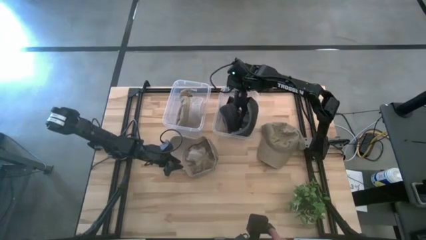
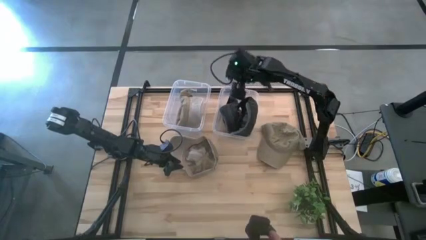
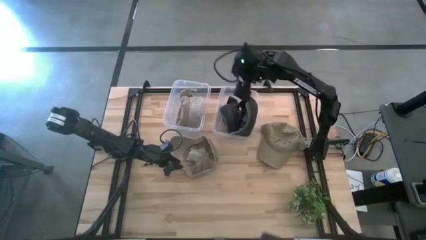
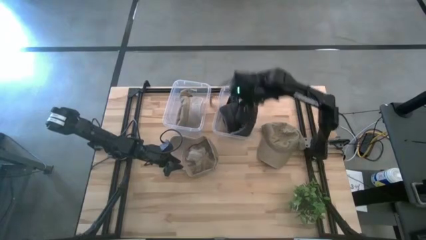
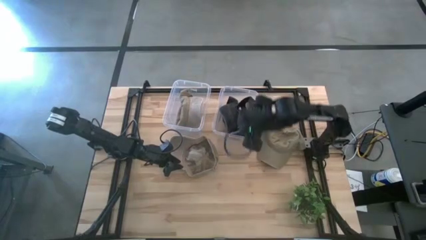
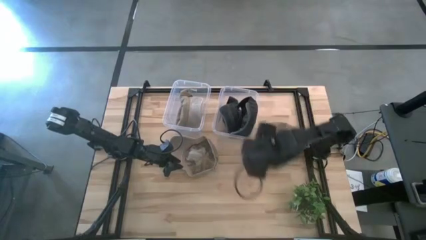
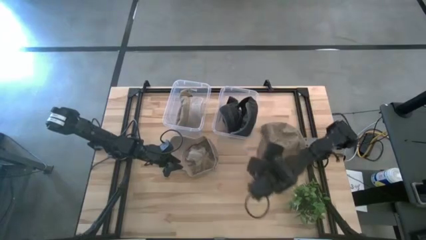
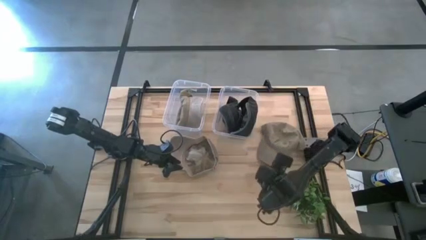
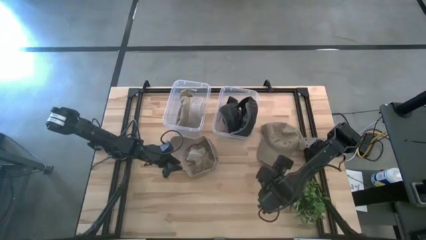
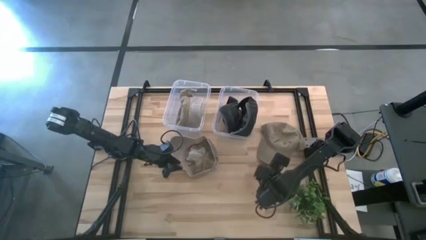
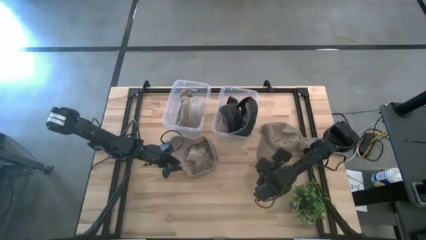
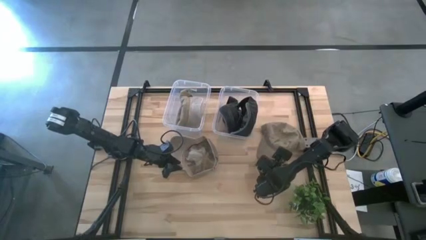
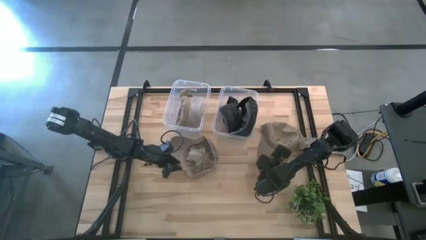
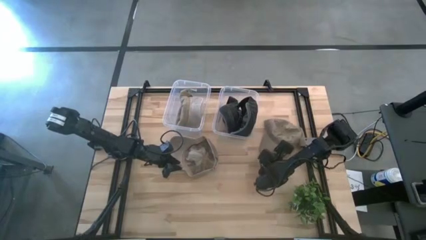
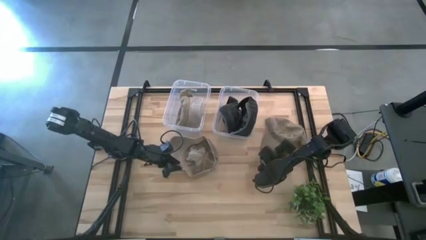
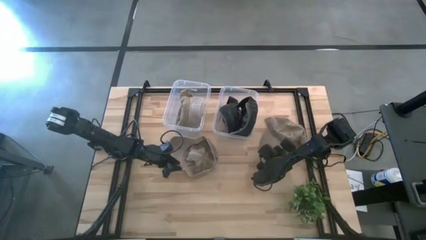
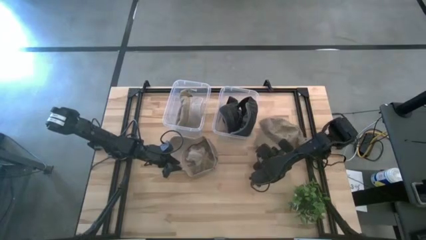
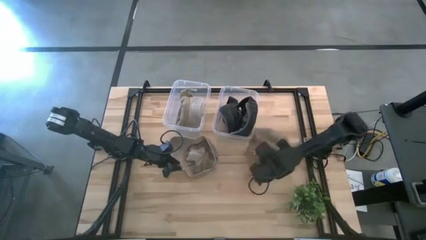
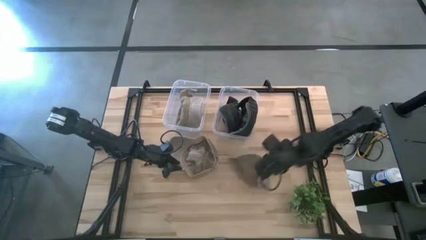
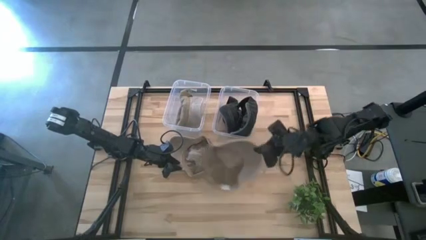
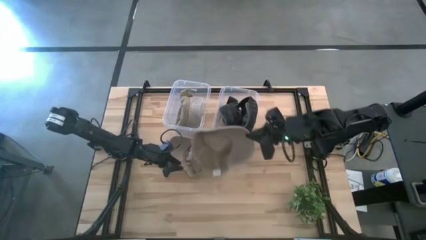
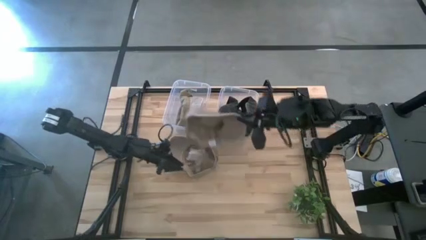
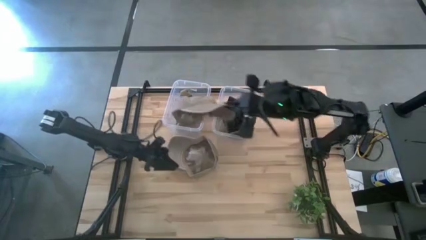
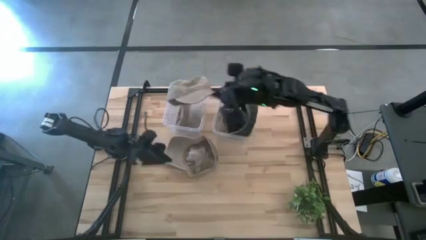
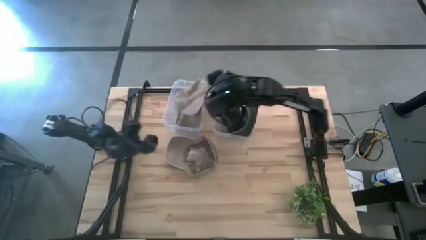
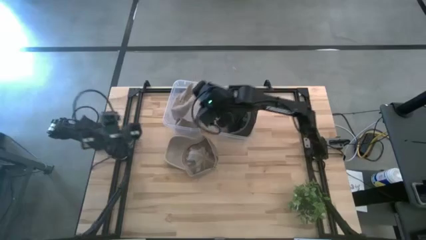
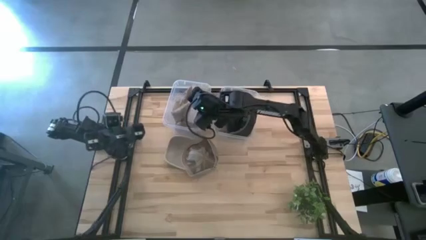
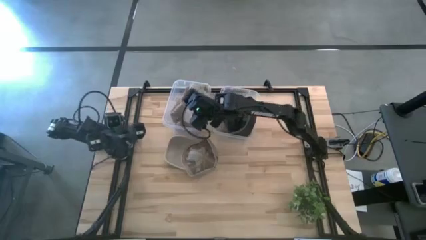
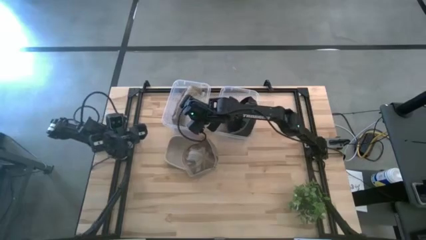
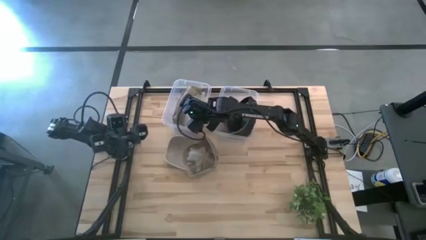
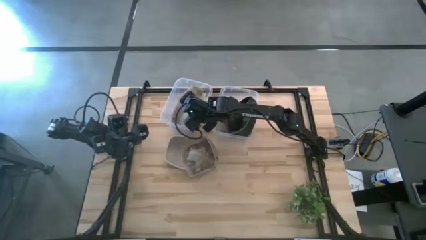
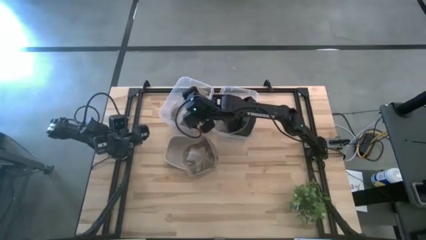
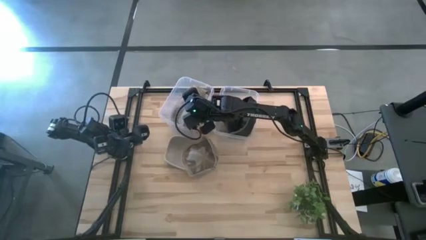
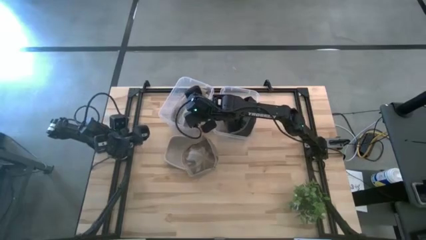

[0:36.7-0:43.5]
Task: Pick & Place hat
Put the right brown cap into the left transparent bin

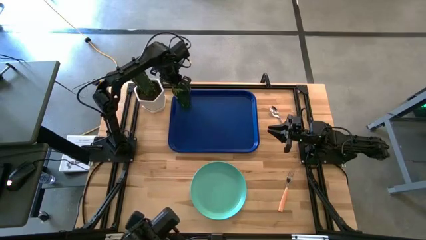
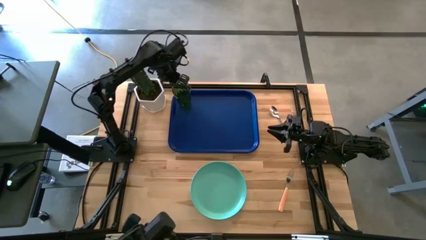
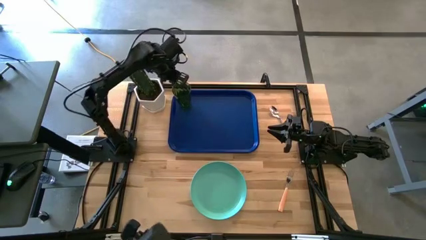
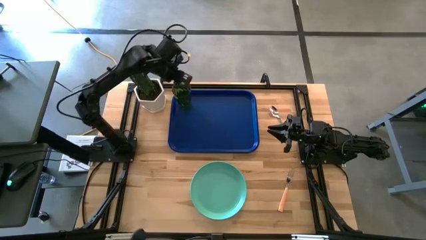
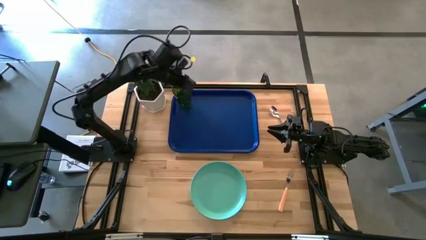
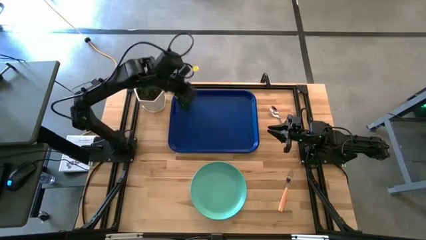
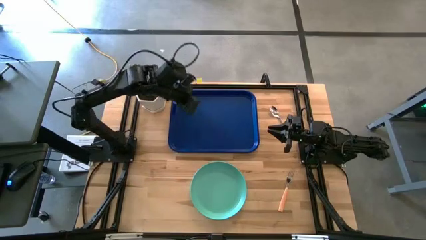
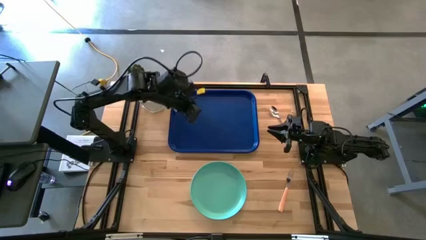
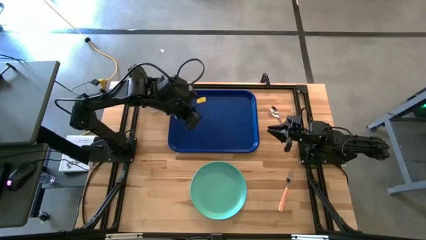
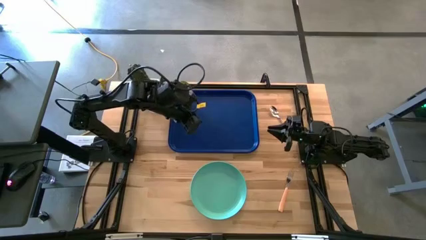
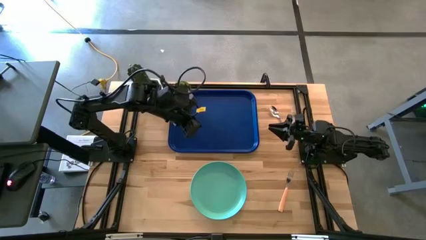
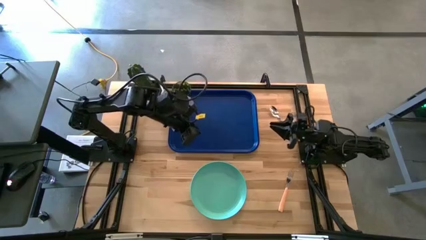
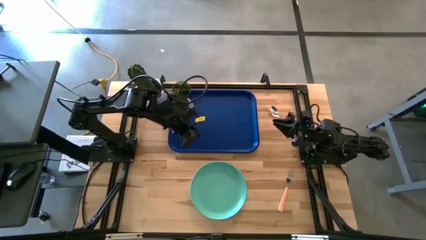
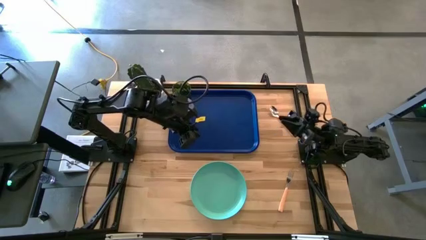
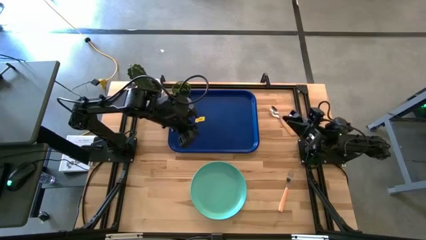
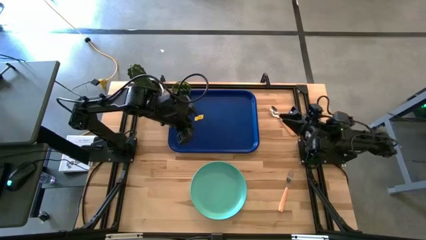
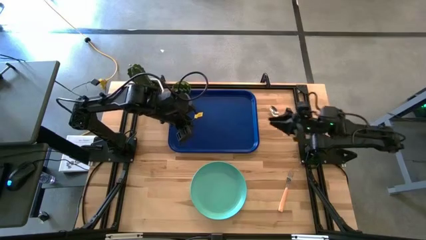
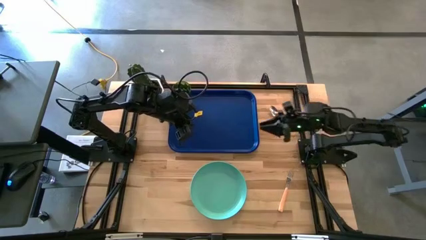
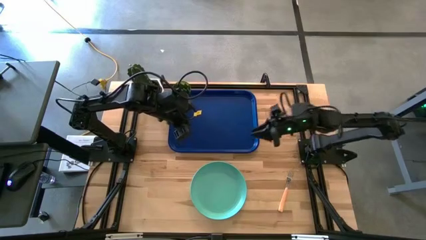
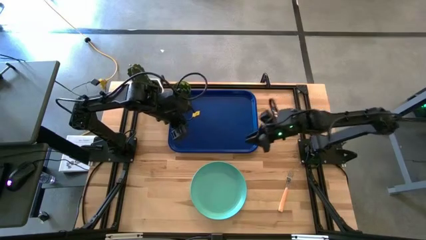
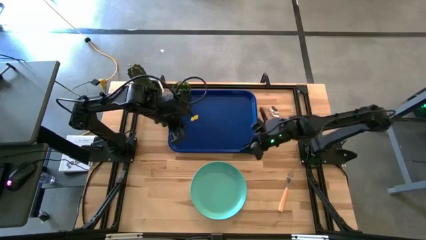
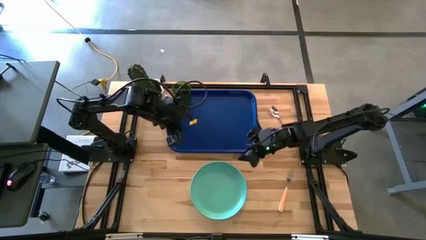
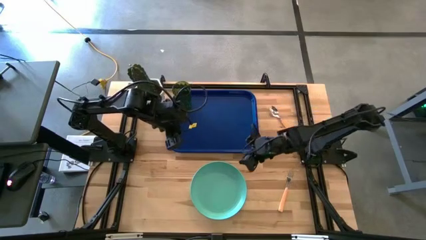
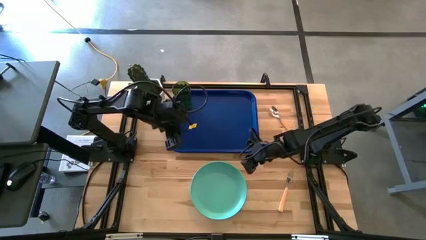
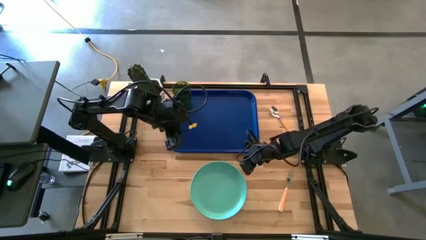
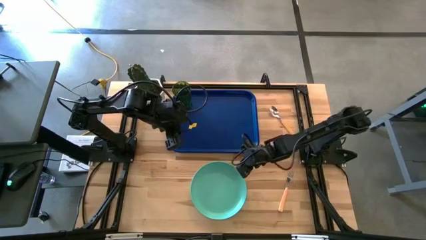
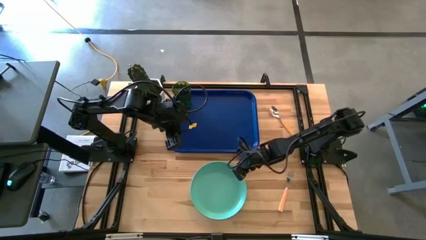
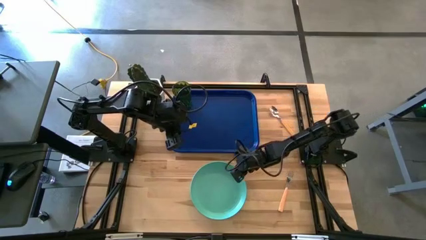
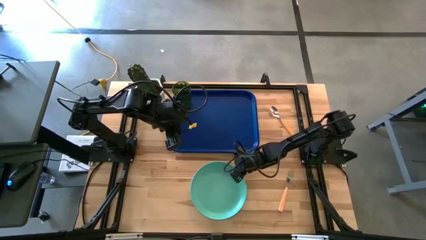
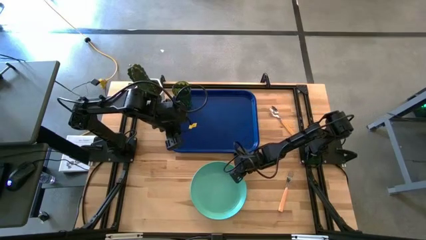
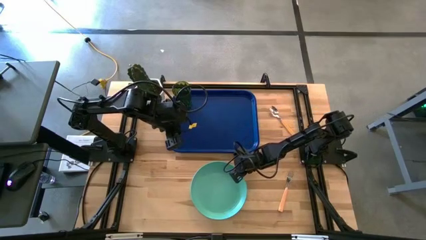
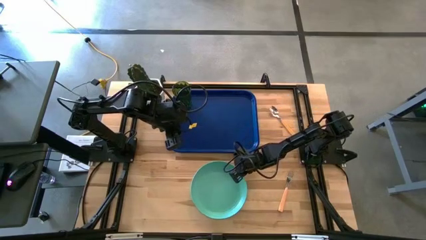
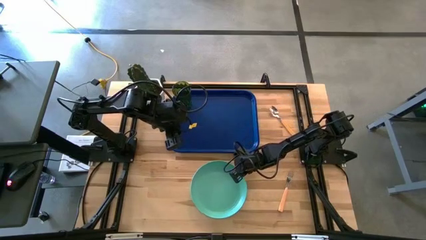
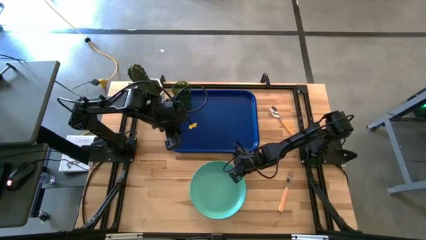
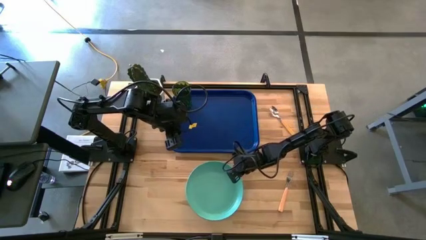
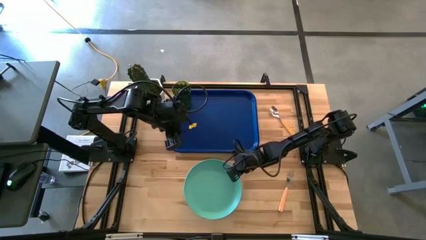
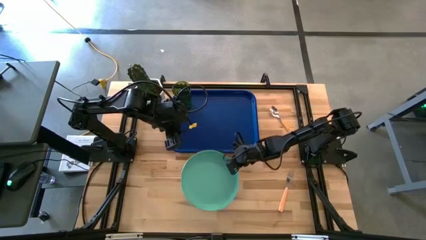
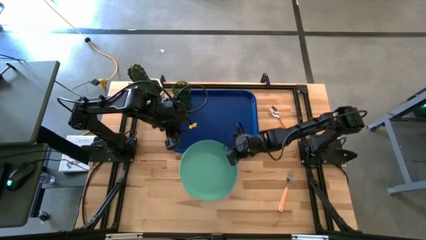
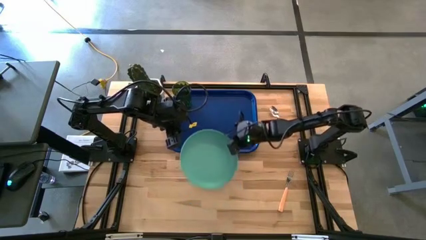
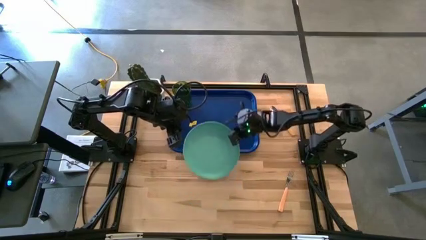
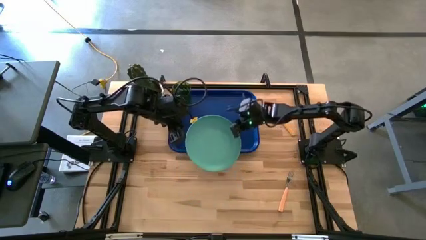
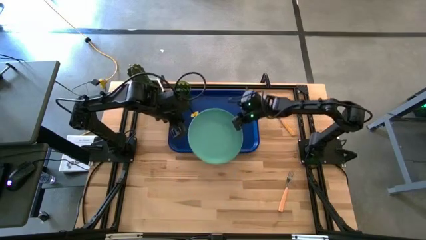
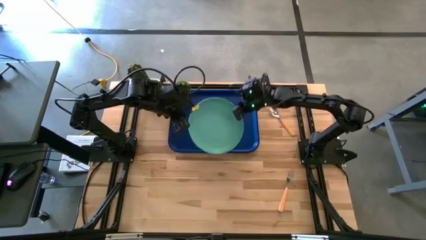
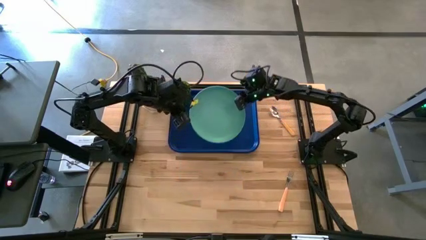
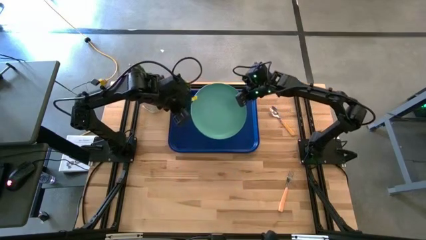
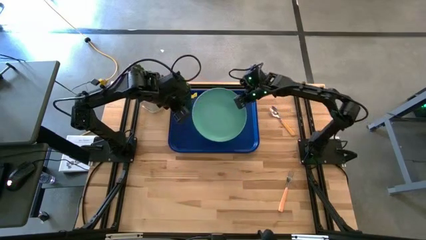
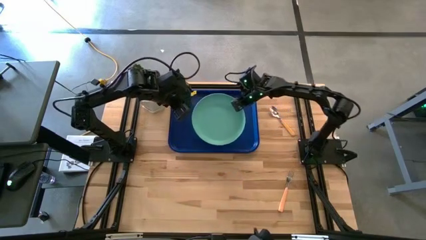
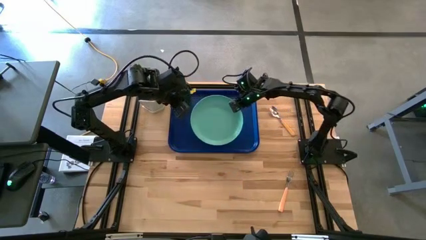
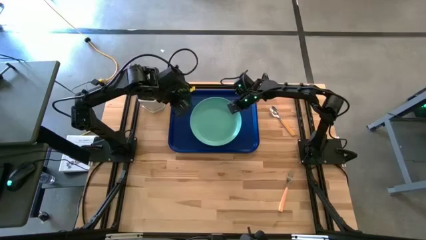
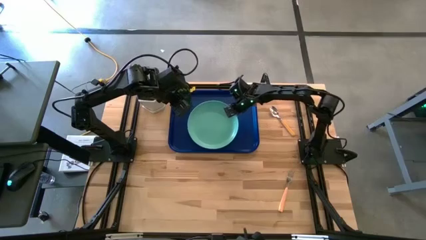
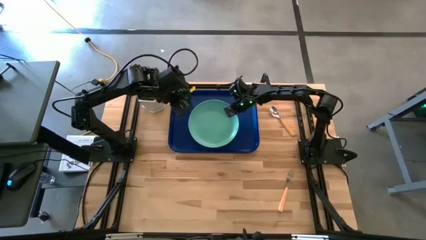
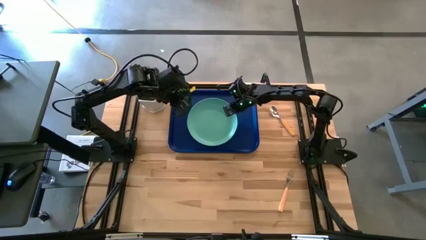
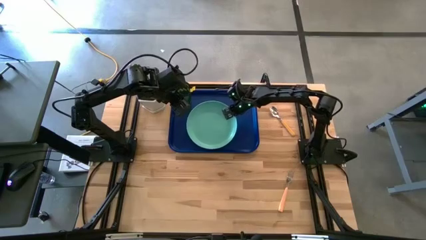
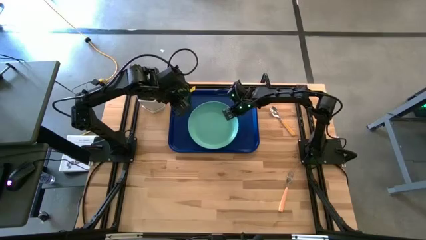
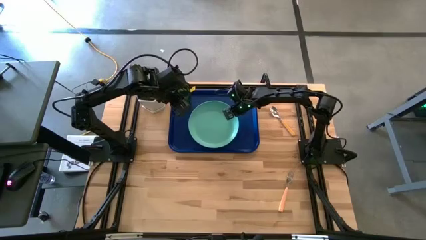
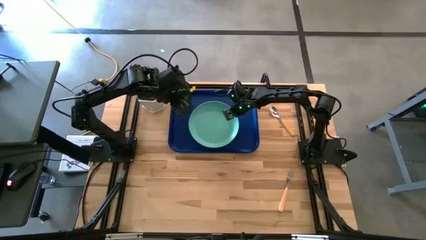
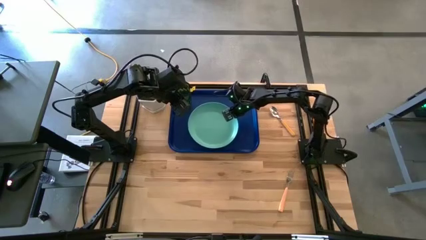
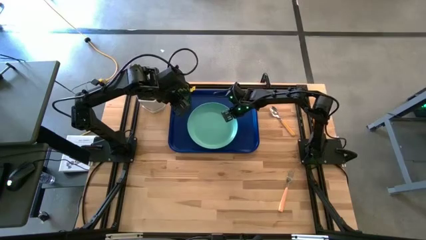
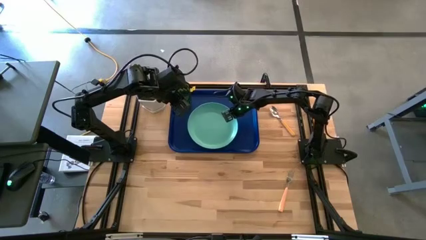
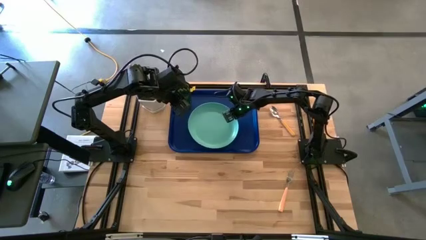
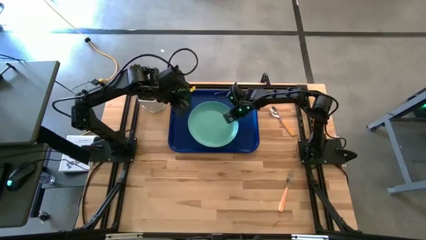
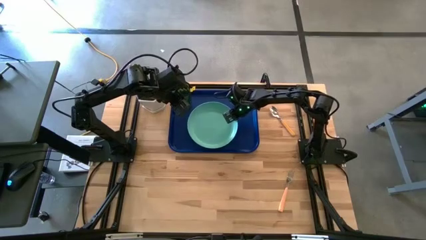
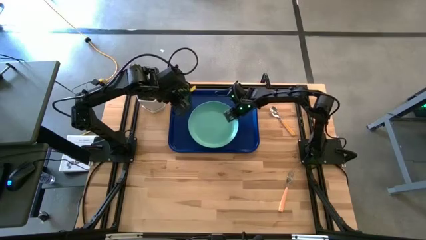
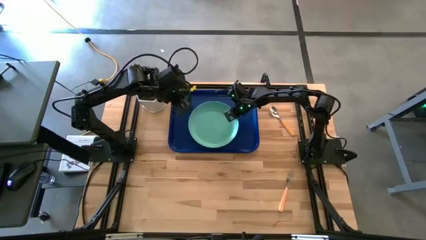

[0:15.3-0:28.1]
Task: Pick and place plate/cup/fork/spoon on tray
Put the light blue plate on the blue tray
